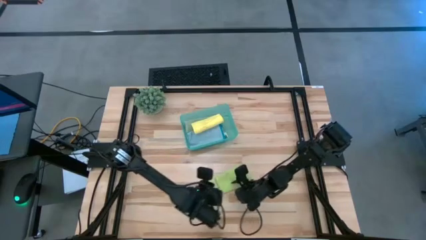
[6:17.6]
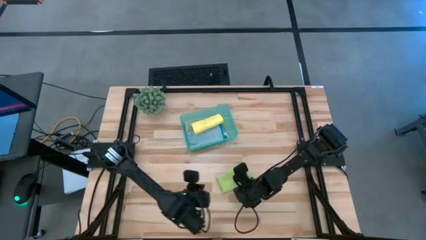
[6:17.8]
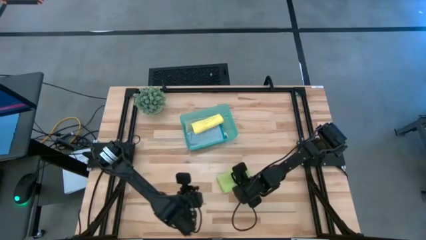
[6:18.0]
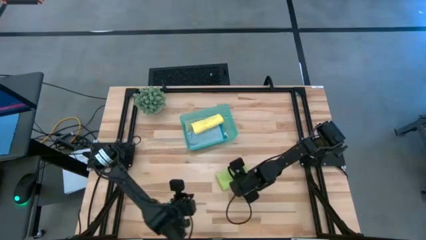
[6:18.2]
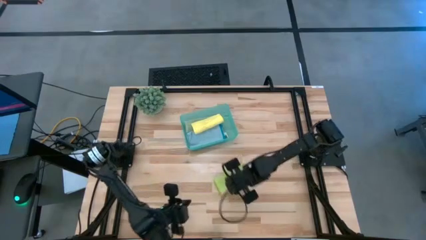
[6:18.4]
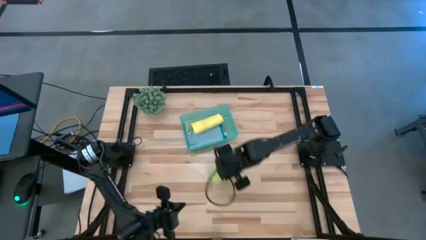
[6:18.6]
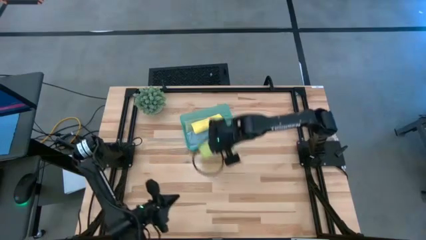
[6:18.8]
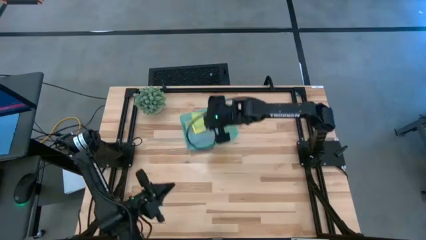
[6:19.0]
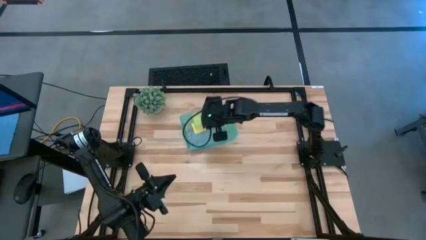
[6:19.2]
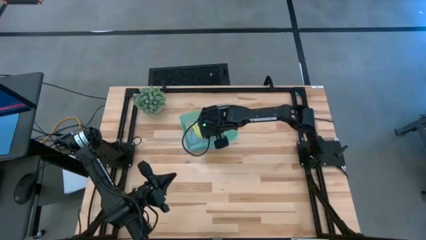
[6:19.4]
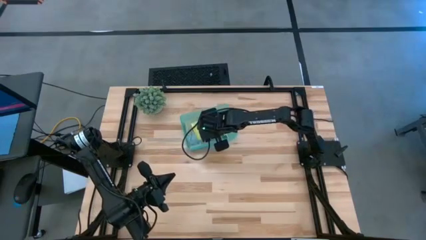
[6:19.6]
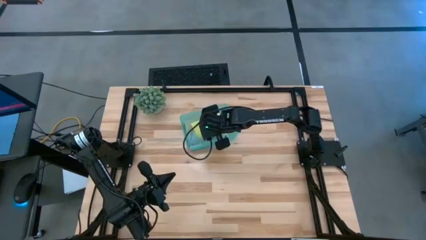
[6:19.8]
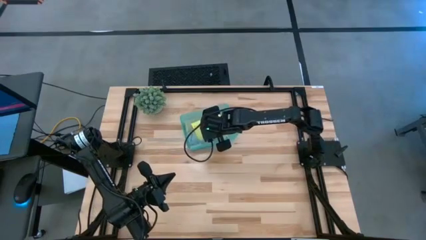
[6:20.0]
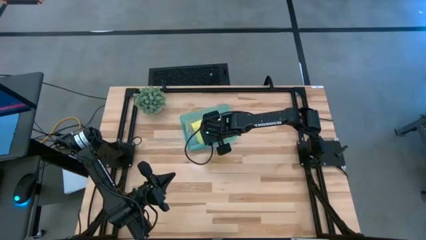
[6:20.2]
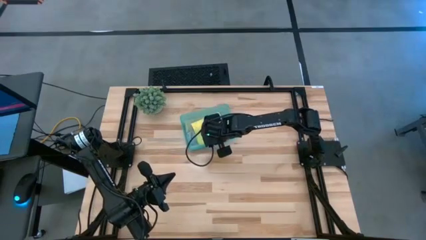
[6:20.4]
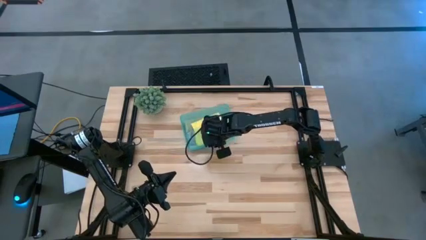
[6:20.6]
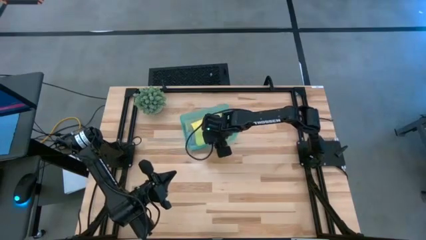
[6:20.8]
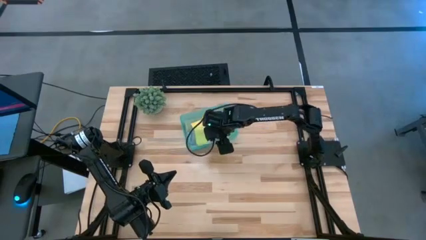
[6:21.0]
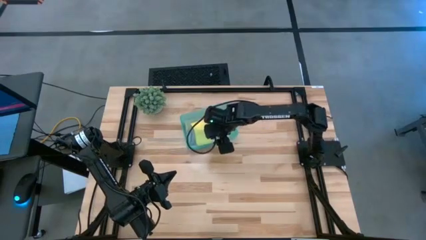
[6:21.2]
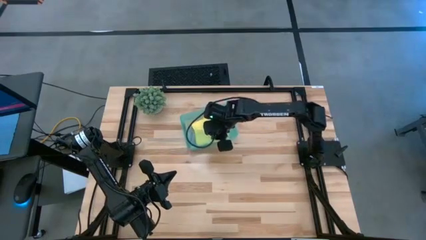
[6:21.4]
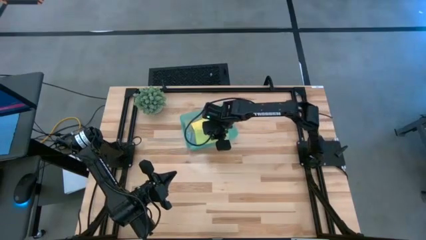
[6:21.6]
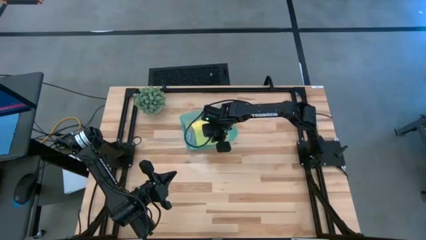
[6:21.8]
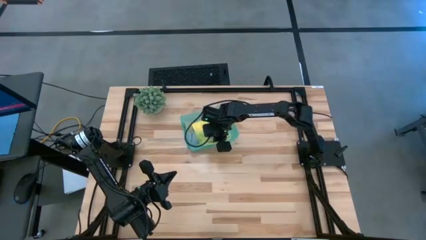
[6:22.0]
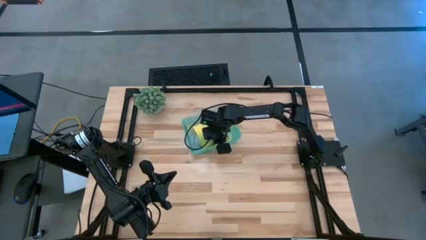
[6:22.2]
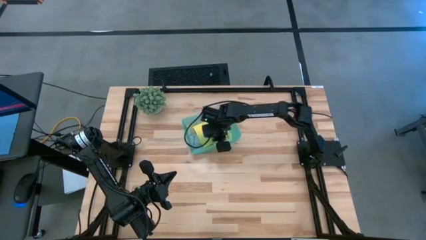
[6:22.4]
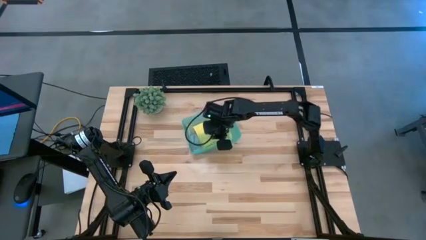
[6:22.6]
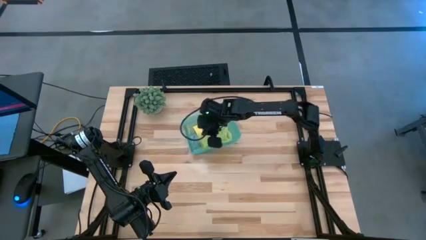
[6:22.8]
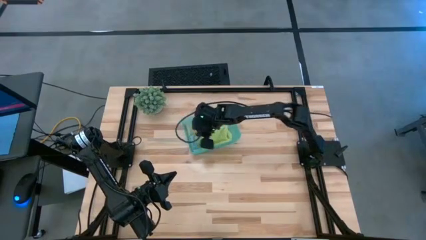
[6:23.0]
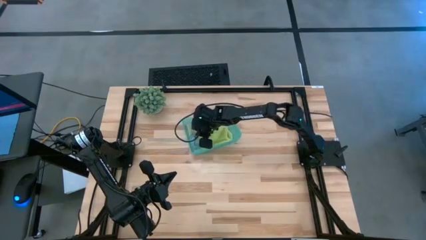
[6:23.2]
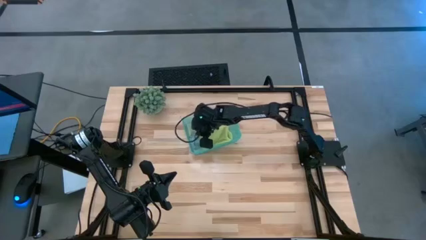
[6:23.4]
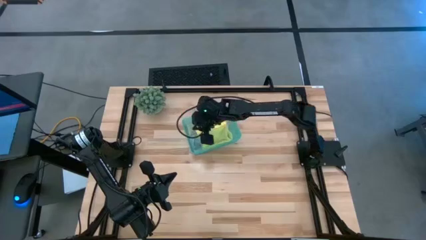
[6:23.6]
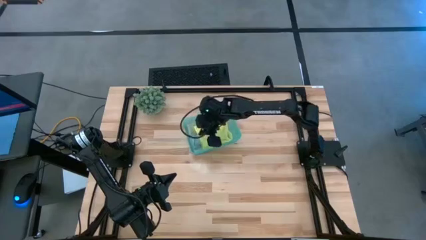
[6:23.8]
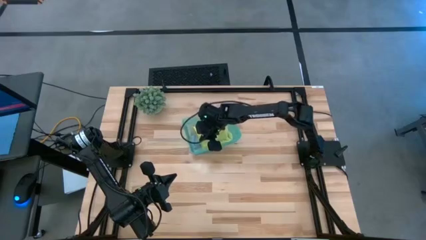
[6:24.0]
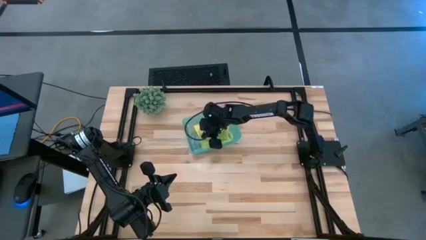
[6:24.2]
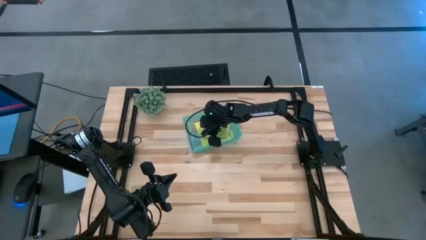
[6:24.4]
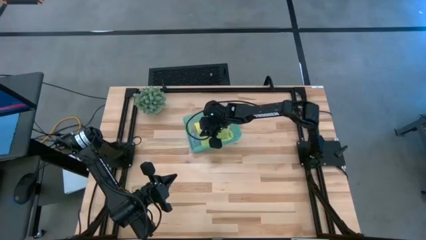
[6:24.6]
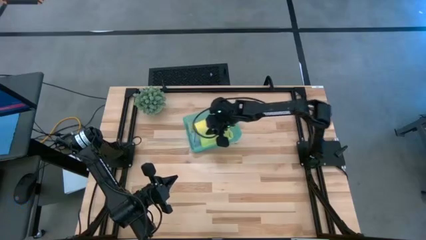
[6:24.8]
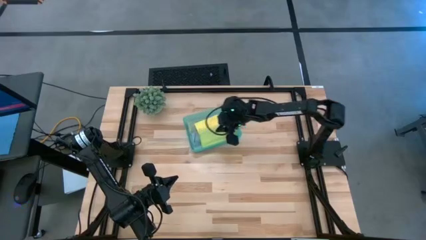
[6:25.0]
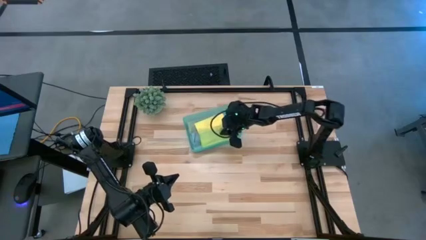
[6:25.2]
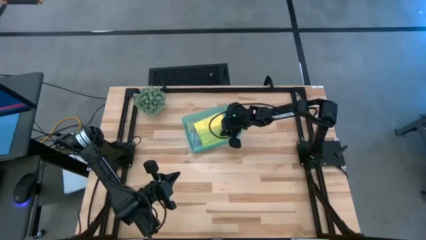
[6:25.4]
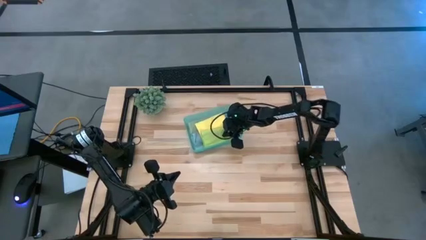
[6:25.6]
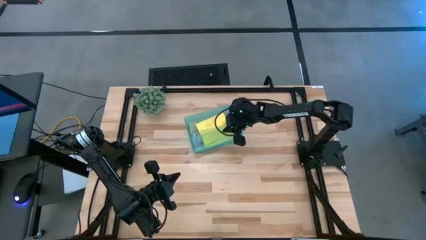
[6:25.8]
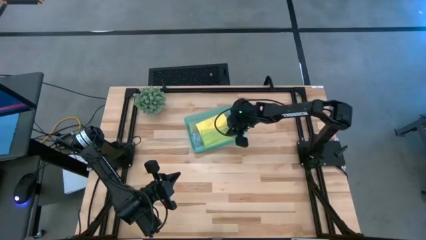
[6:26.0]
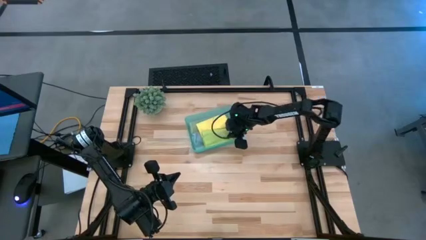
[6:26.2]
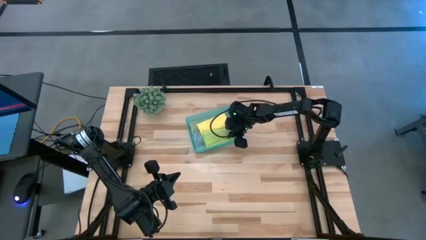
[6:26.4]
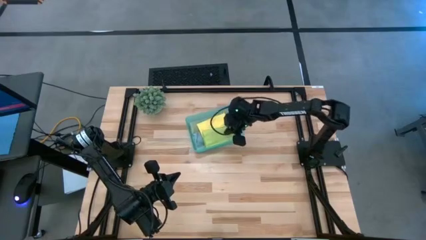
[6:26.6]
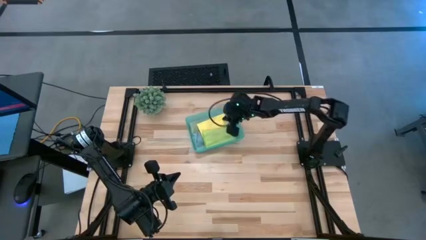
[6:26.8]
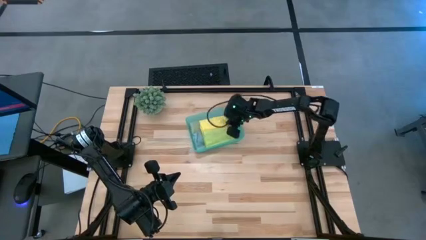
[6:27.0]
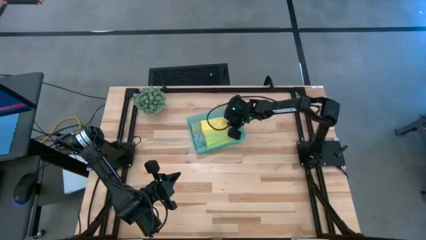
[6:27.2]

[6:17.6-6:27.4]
Task: Fold microfiber towels
Put the light green towel into the bin

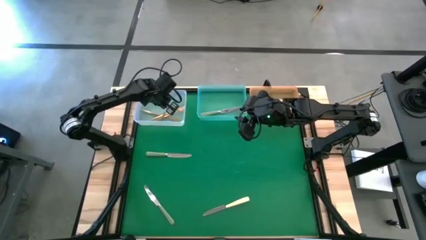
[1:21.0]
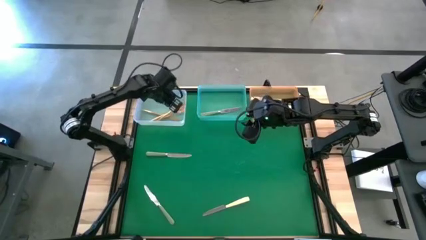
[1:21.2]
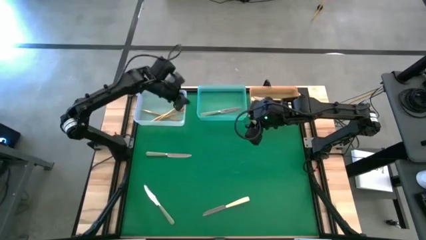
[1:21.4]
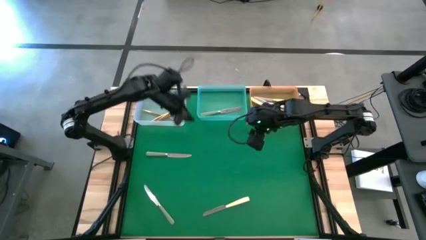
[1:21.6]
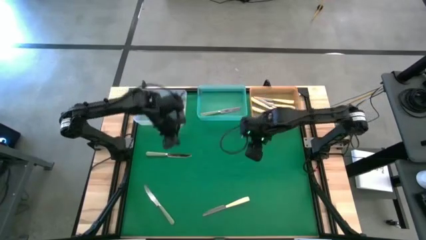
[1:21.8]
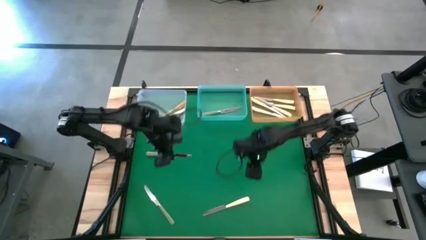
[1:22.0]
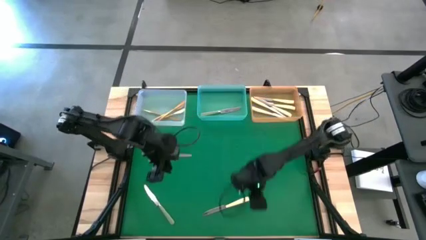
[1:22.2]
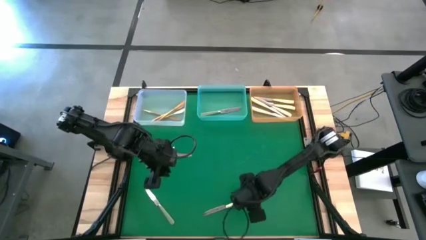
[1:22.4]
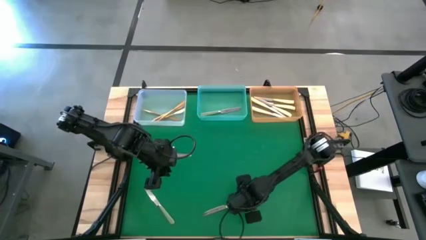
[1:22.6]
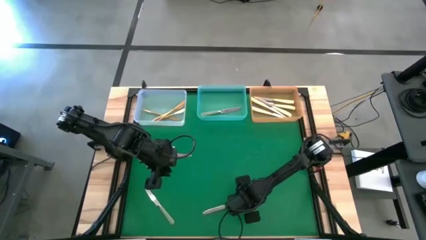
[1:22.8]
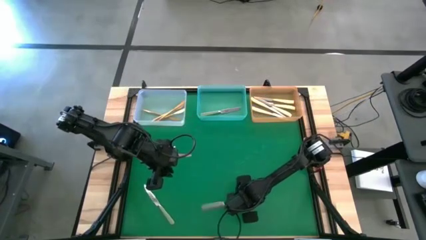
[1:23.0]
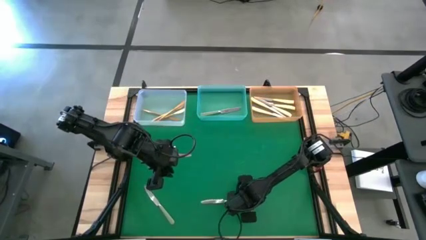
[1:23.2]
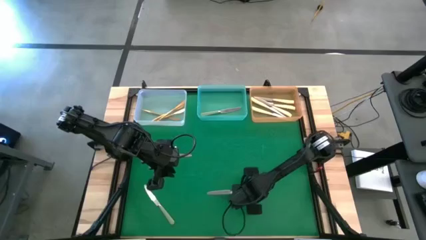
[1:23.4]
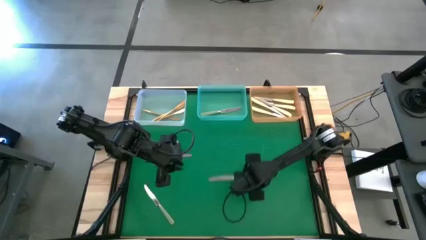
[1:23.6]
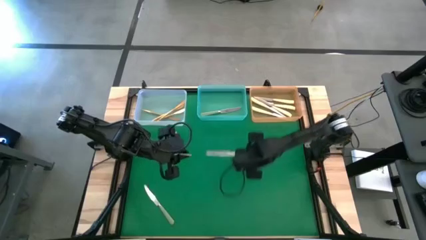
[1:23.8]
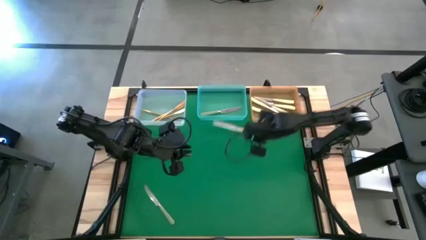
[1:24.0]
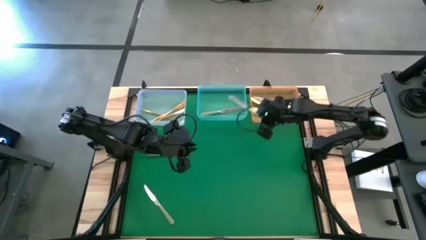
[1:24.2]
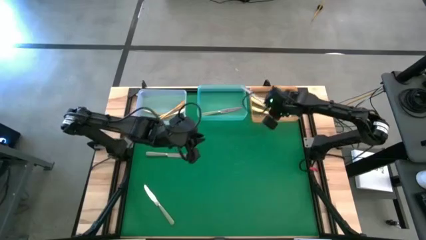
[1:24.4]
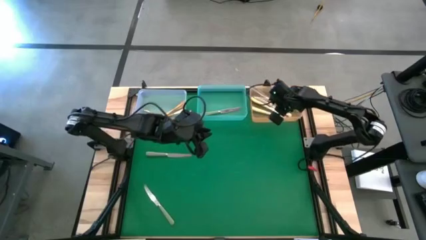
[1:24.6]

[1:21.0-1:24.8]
Task: Sort silverware by color (type)
Put the yellow table knife into the orange bin
